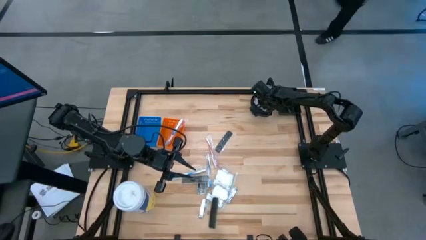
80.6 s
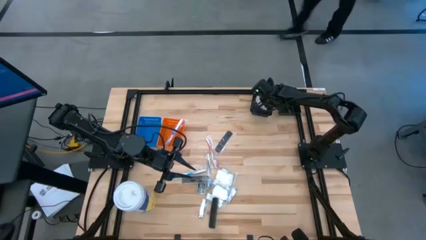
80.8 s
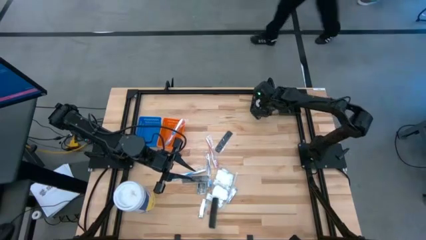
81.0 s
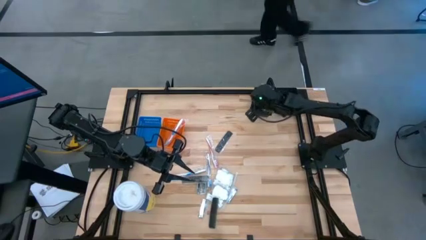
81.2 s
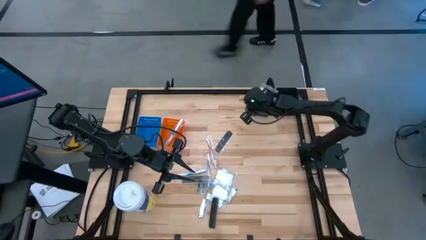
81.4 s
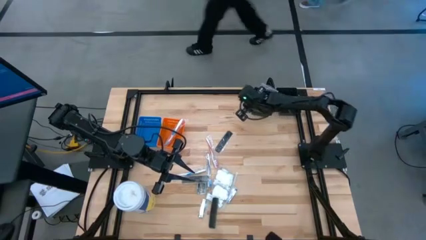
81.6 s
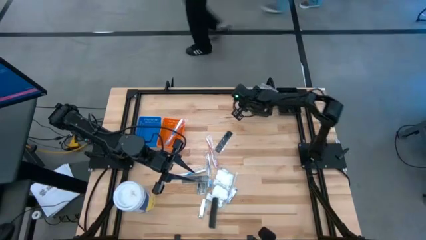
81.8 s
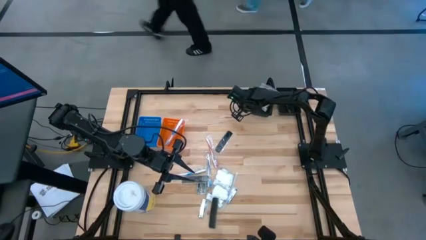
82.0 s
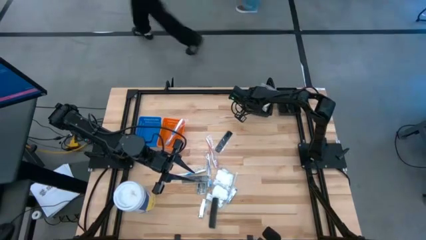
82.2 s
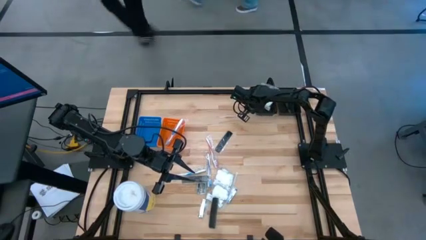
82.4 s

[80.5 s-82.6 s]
Task: Pick & Place Travel size toiletries
Adjust the left black bin

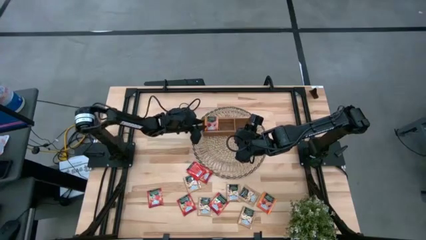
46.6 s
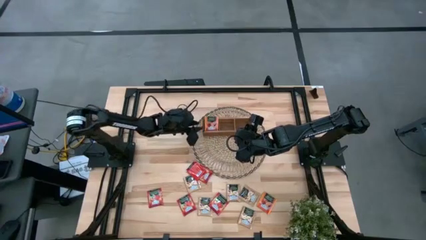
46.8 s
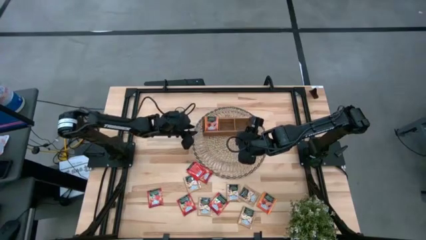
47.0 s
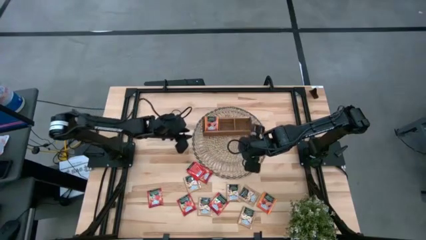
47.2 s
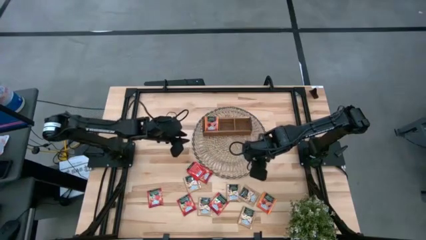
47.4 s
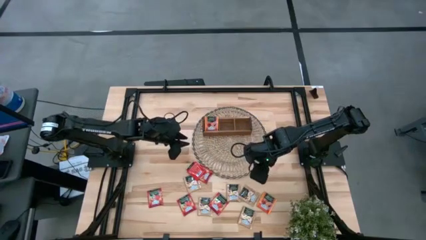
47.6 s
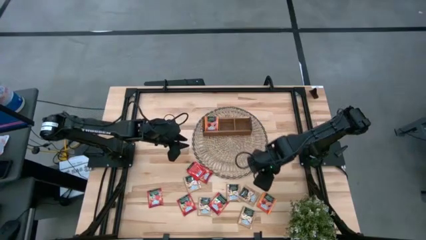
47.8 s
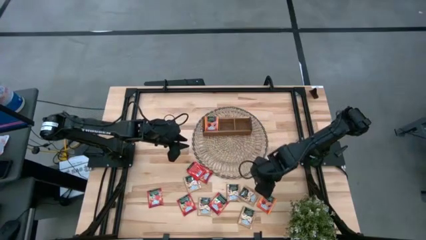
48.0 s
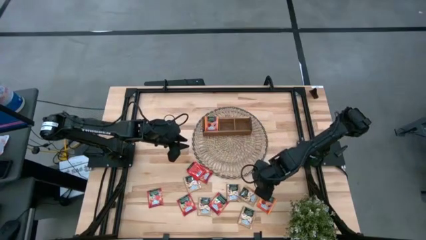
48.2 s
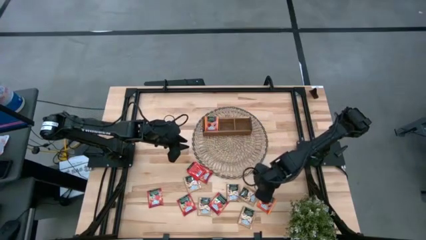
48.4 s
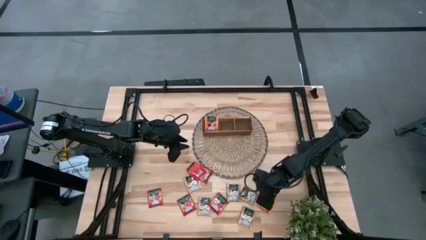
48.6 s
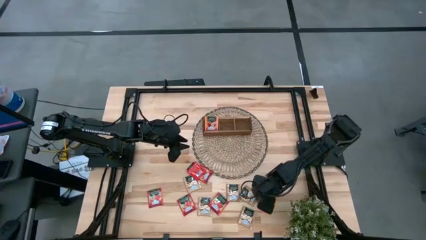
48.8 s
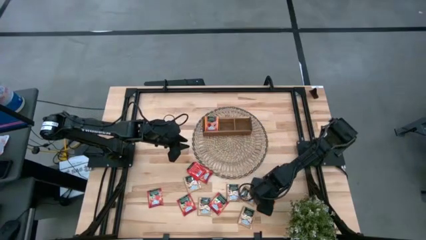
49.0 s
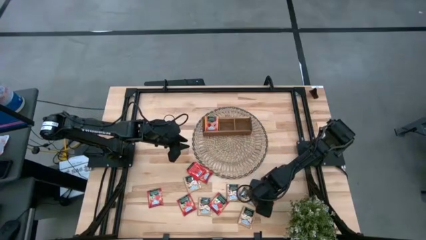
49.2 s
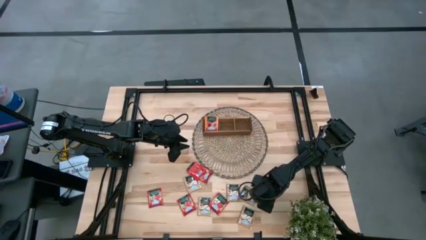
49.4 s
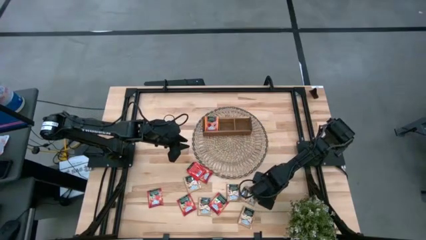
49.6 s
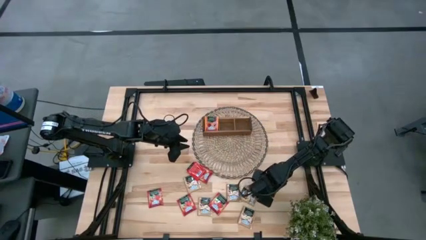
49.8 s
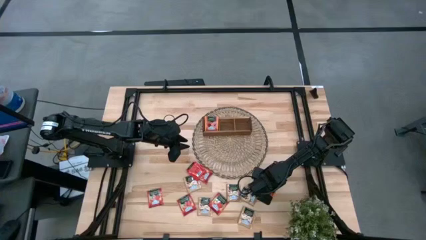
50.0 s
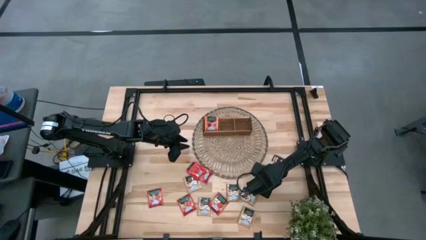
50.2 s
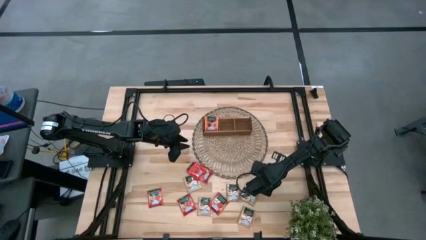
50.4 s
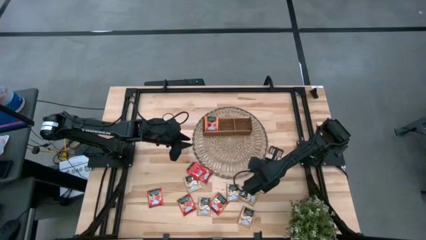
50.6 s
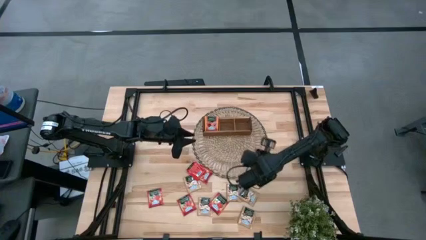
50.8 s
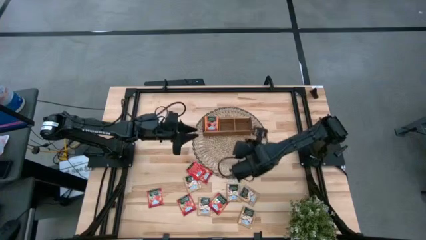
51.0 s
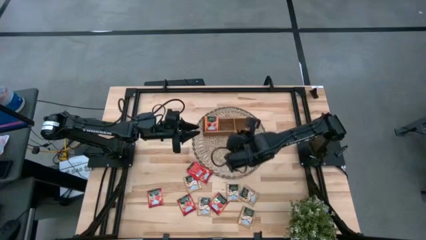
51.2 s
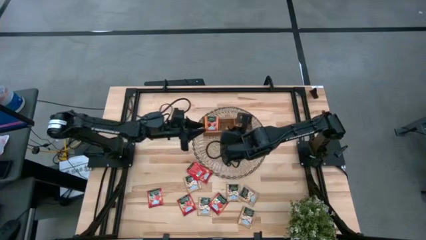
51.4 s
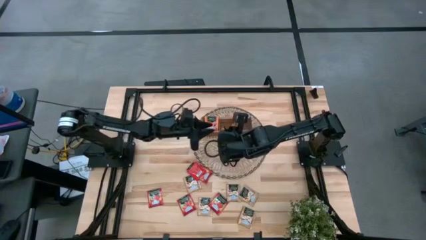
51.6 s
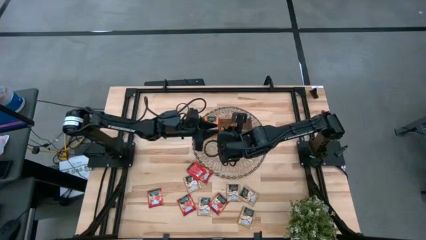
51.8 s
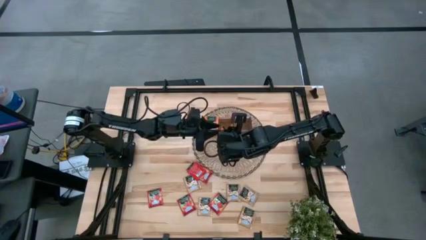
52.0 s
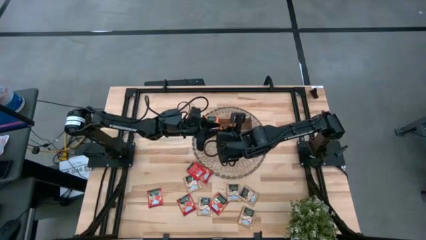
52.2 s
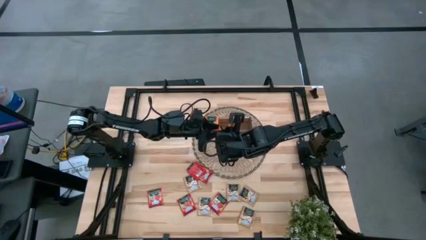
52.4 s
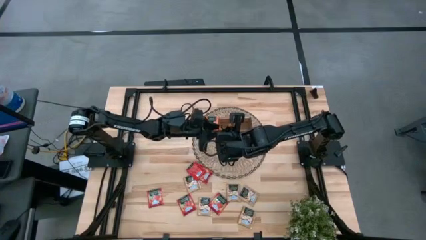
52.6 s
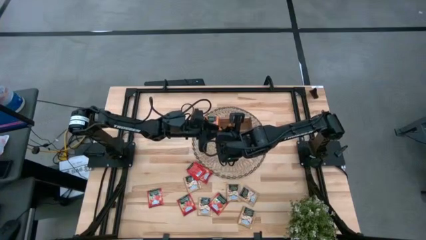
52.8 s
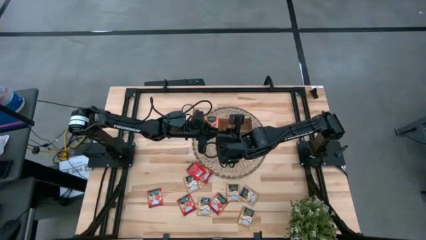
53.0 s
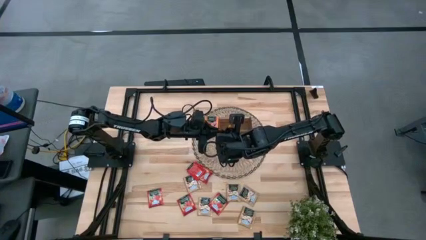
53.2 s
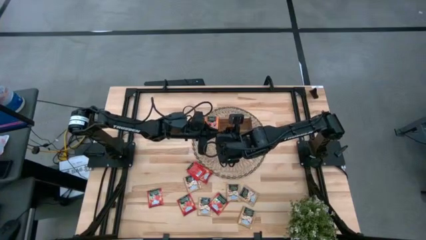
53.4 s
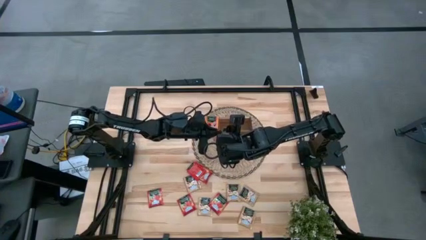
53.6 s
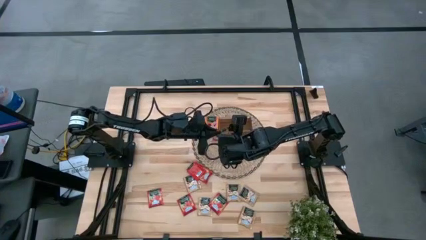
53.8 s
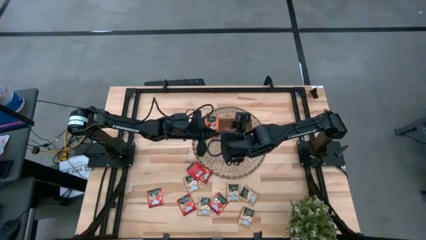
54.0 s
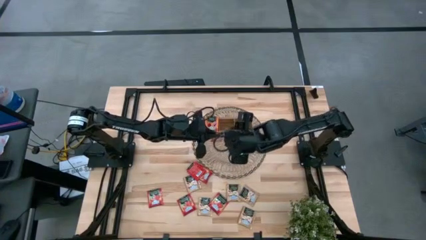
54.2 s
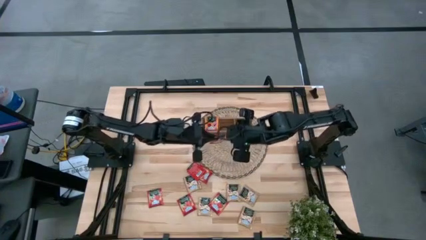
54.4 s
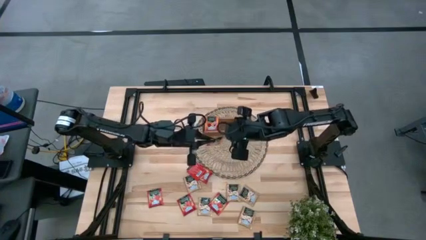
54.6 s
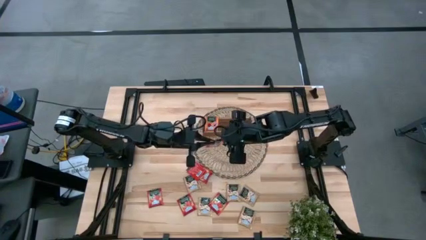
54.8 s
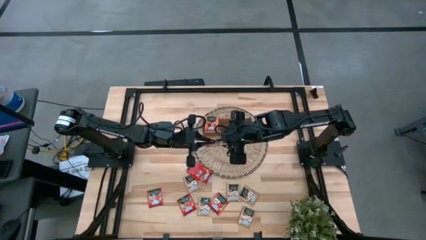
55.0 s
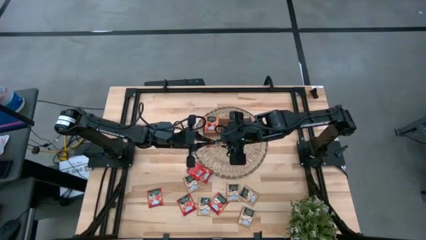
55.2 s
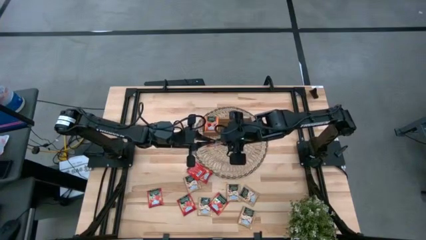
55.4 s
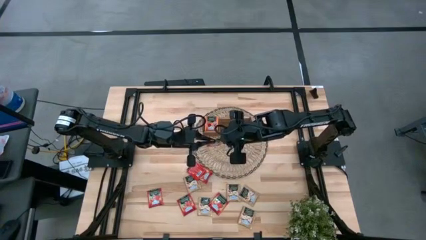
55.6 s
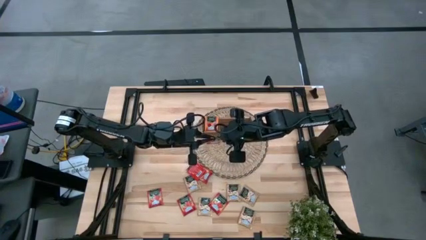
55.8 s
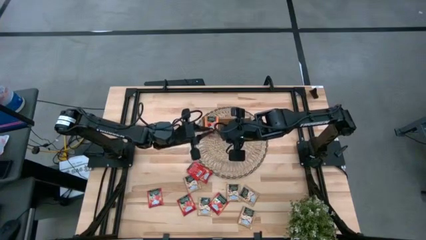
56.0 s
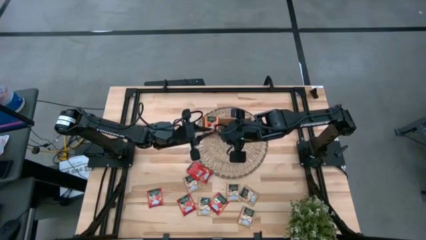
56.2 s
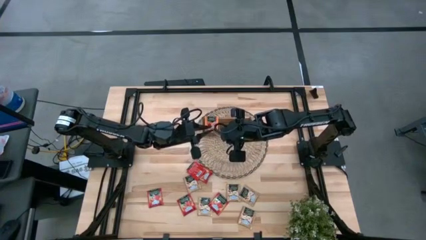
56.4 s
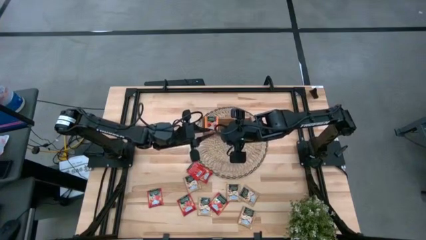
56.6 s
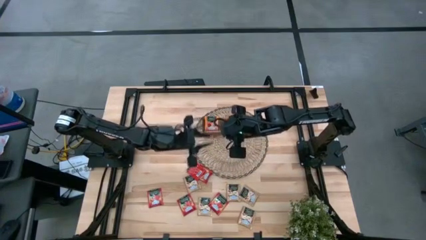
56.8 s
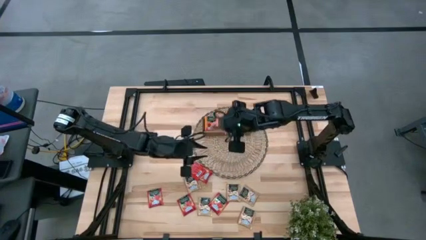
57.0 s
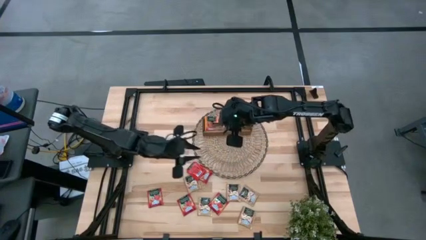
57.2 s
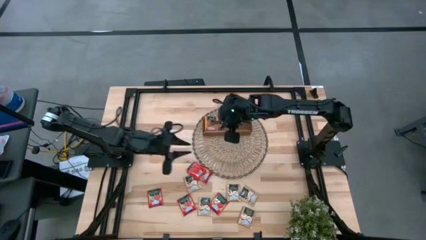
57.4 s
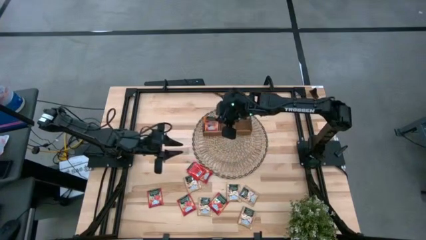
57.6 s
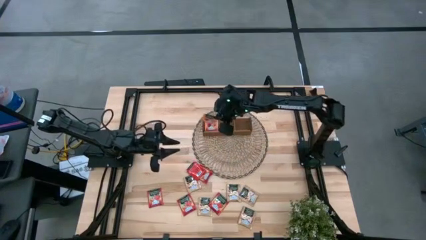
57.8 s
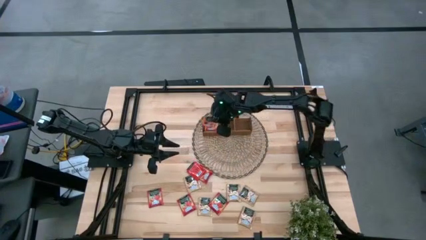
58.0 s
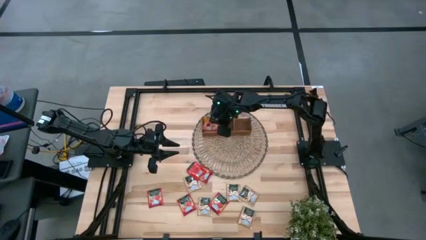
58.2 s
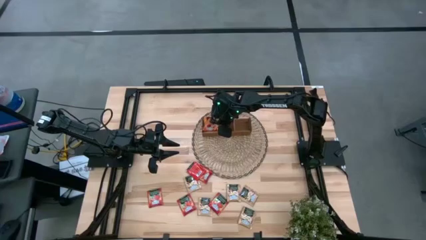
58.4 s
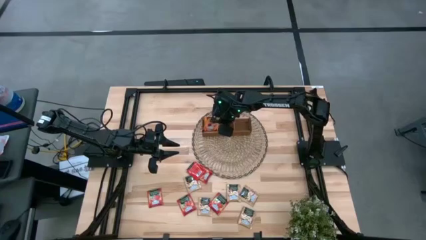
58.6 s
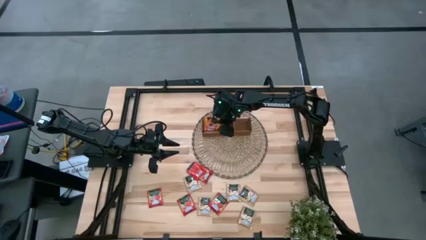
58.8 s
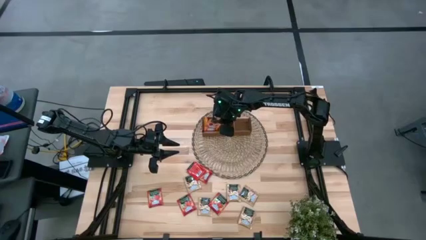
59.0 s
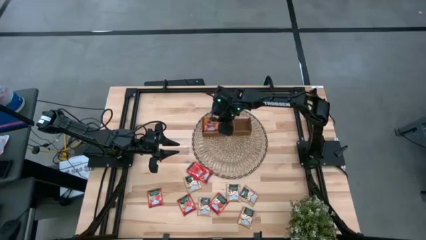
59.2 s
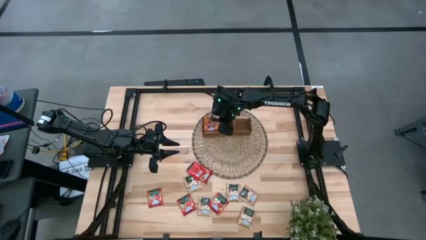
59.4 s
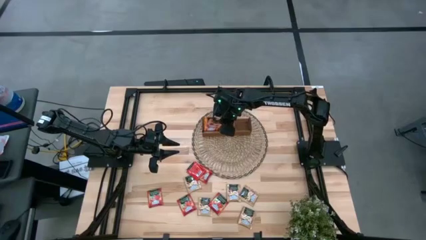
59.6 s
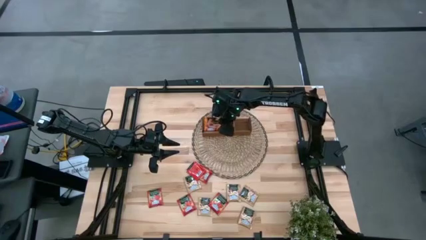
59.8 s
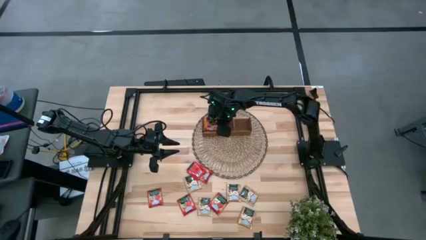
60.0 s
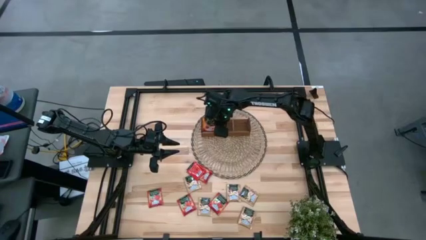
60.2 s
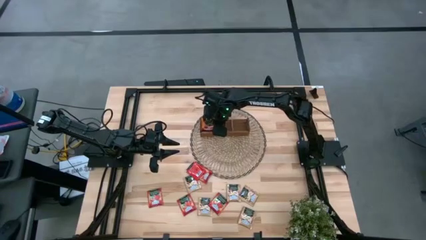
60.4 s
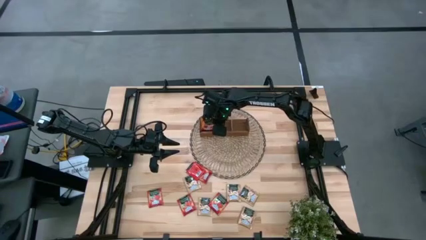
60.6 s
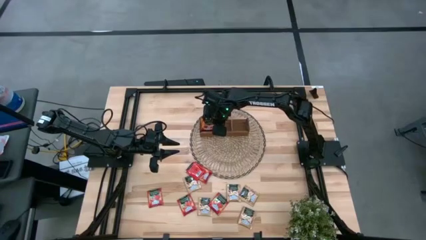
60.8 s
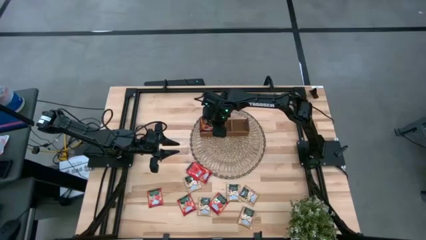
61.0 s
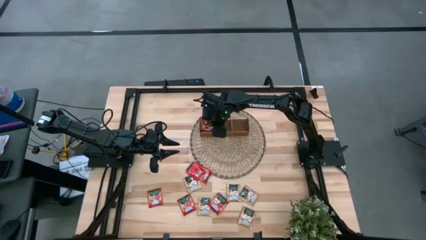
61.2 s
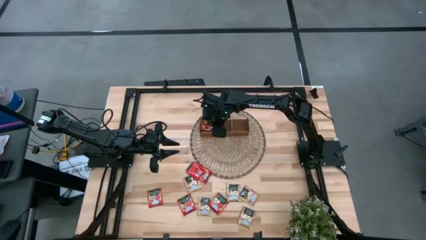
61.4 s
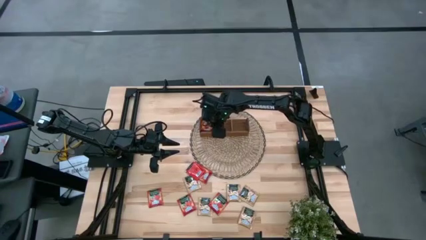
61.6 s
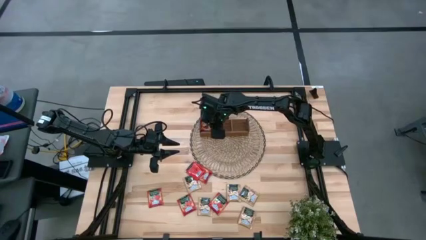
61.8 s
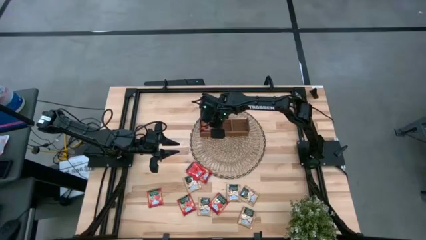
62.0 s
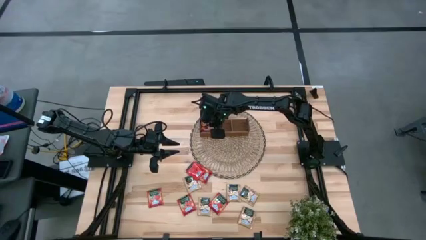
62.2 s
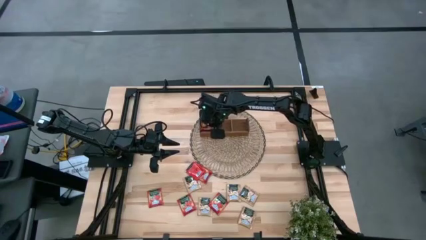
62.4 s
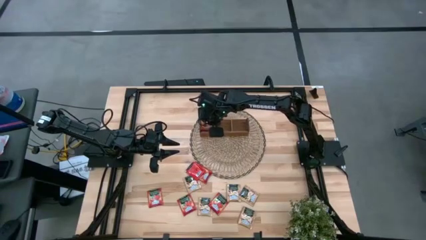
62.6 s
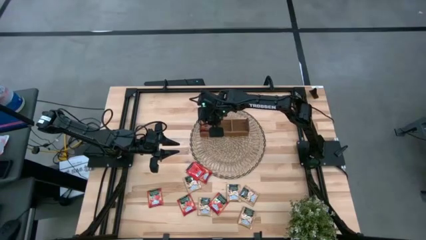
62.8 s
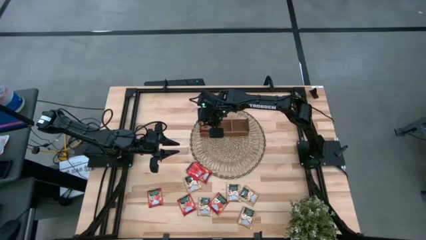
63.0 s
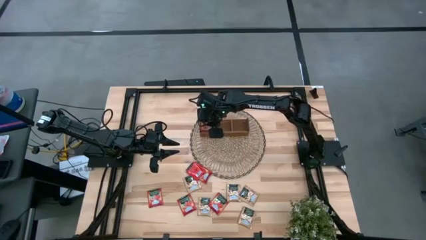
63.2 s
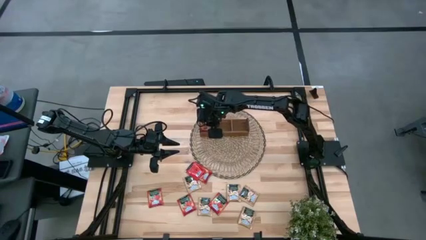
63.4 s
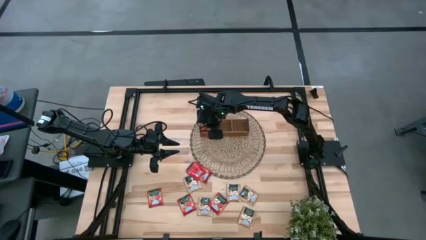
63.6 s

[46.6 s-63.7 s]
Task: Pick & Place Tea
Put the orange tea bag into the left section of the wooden organizer
